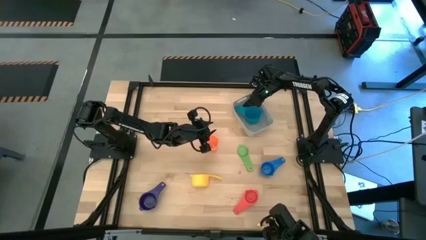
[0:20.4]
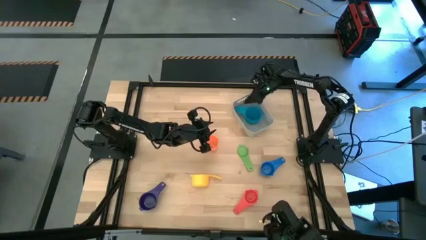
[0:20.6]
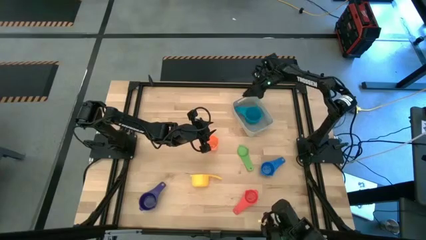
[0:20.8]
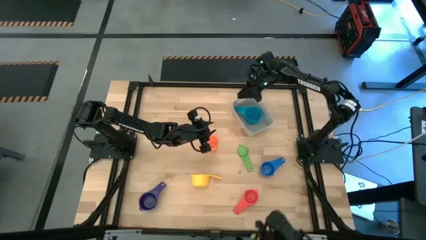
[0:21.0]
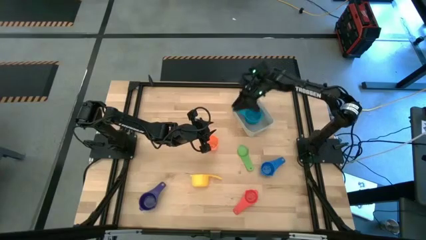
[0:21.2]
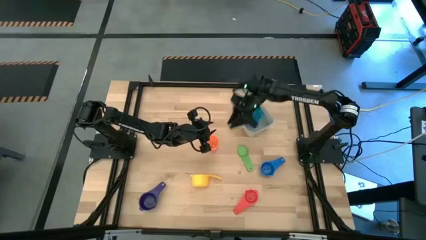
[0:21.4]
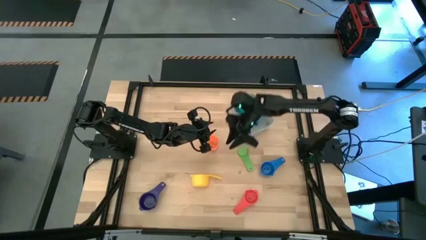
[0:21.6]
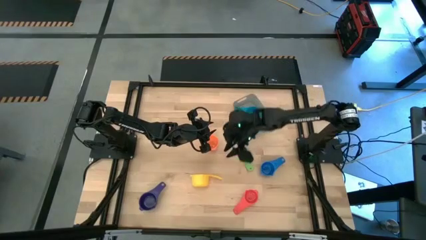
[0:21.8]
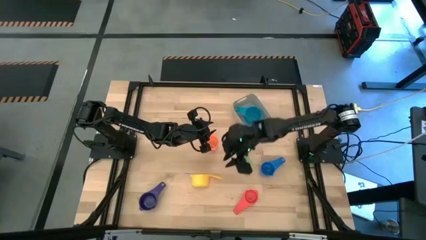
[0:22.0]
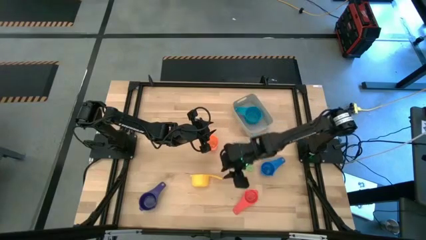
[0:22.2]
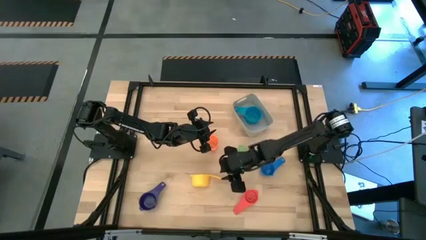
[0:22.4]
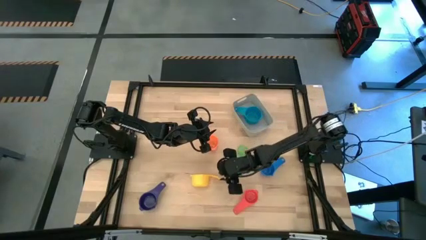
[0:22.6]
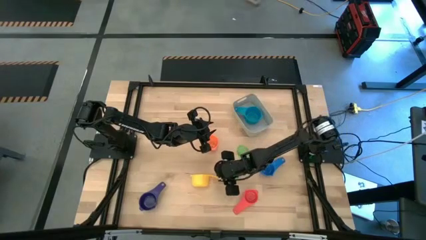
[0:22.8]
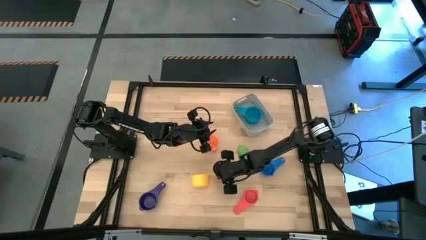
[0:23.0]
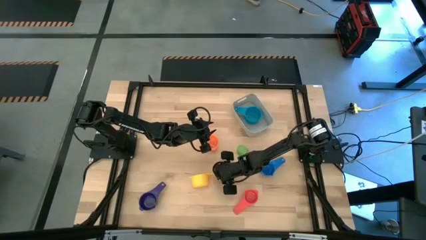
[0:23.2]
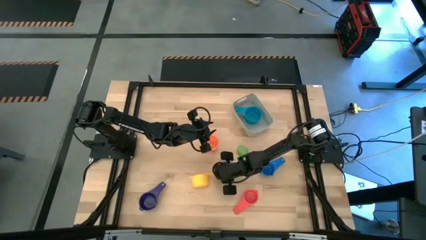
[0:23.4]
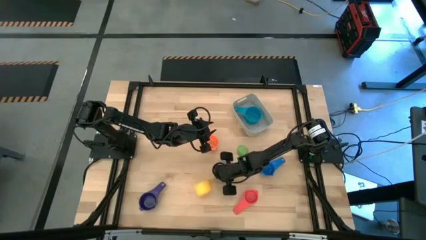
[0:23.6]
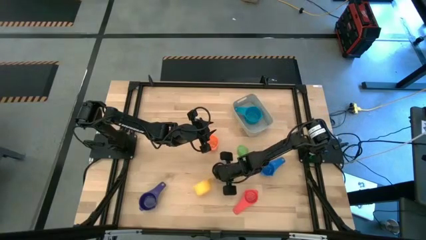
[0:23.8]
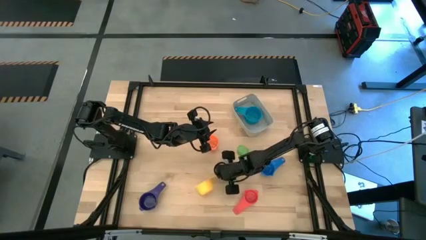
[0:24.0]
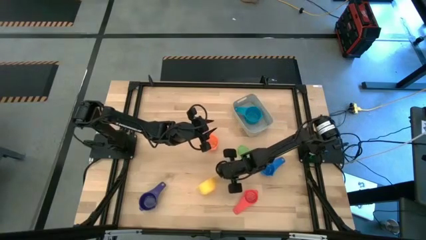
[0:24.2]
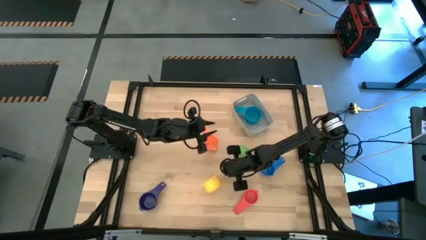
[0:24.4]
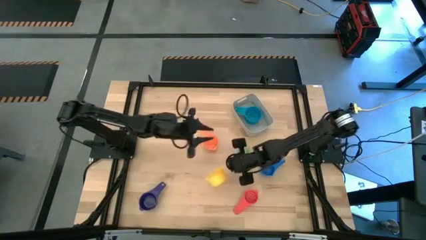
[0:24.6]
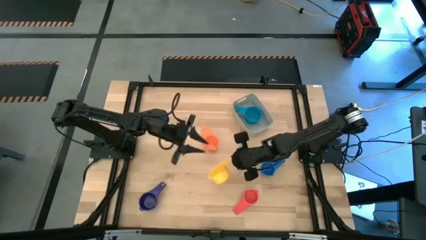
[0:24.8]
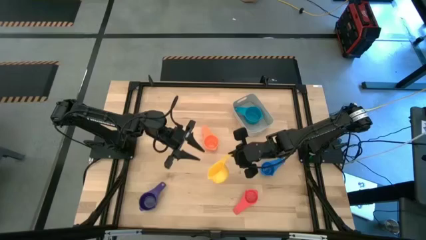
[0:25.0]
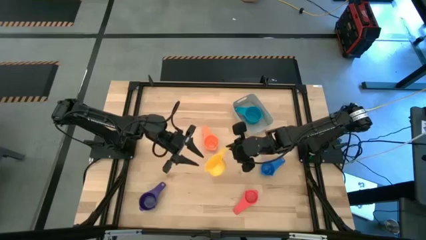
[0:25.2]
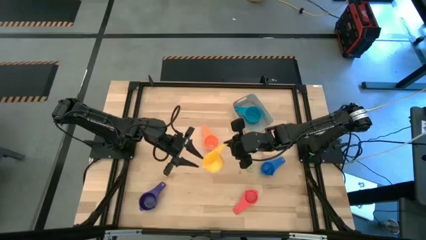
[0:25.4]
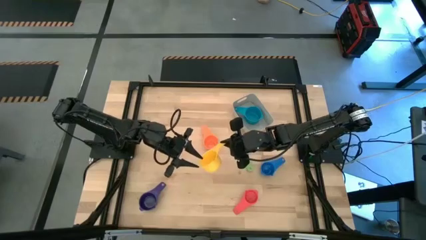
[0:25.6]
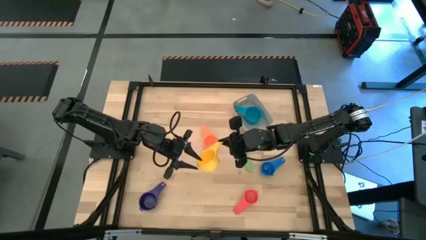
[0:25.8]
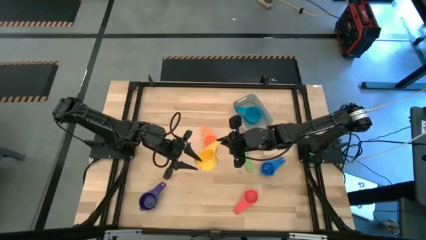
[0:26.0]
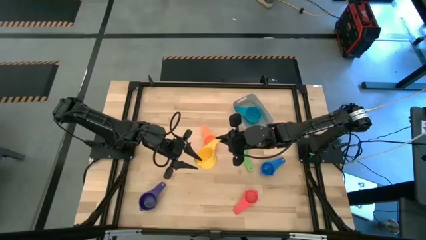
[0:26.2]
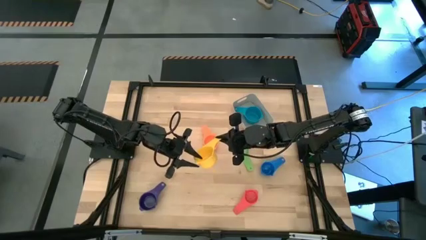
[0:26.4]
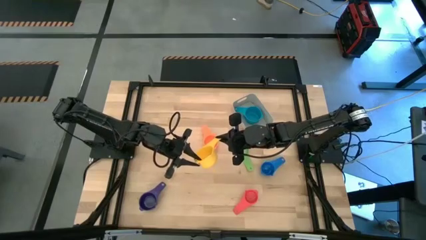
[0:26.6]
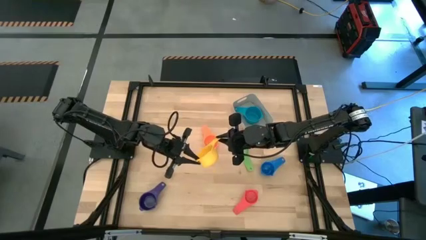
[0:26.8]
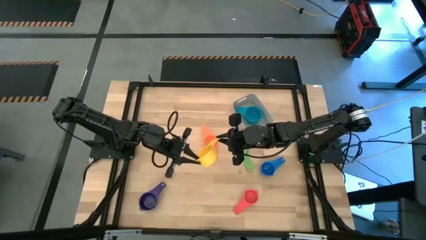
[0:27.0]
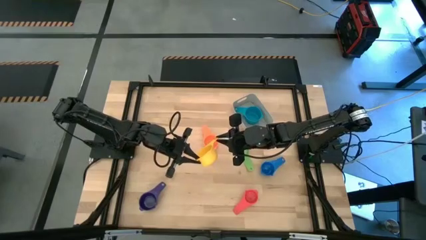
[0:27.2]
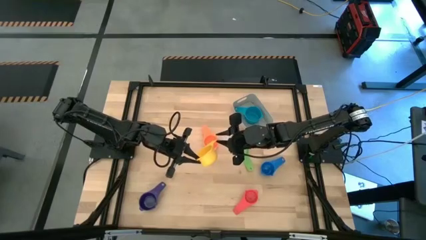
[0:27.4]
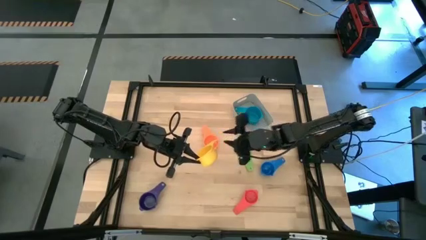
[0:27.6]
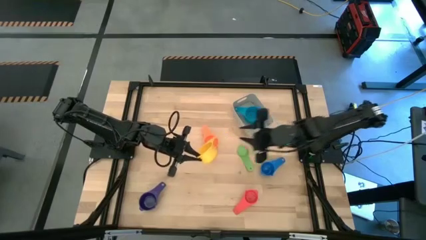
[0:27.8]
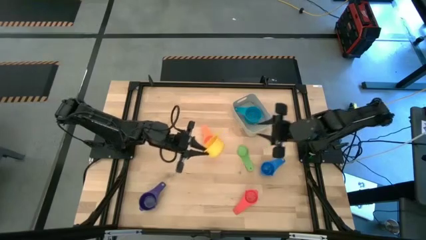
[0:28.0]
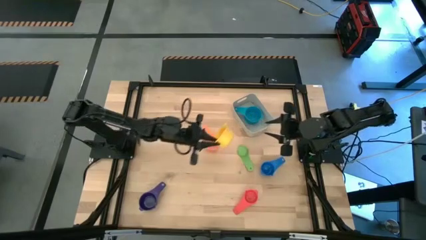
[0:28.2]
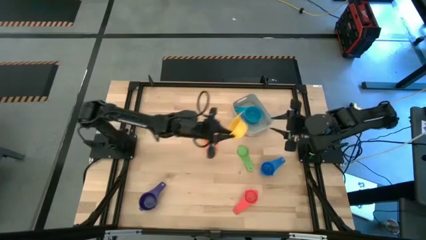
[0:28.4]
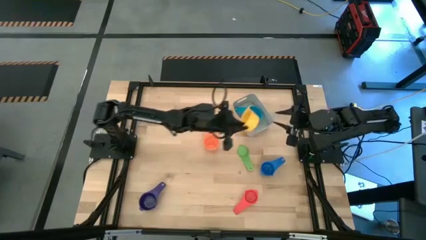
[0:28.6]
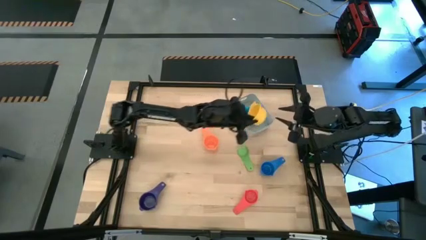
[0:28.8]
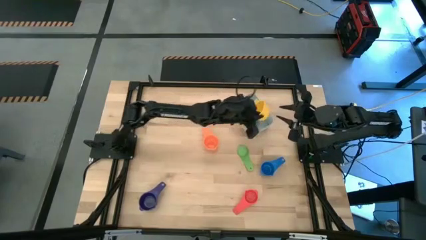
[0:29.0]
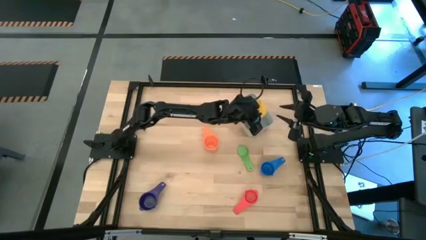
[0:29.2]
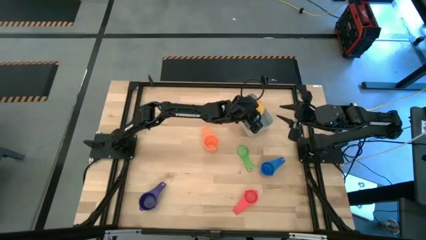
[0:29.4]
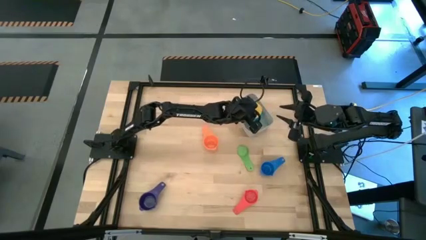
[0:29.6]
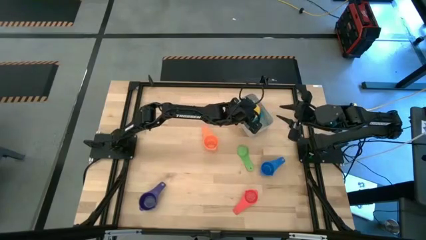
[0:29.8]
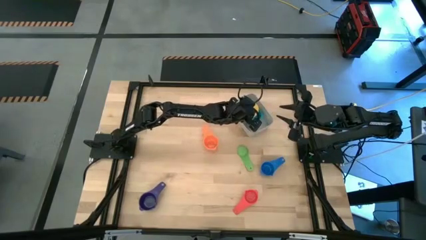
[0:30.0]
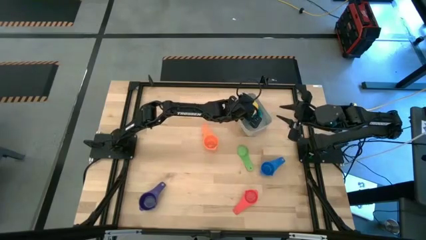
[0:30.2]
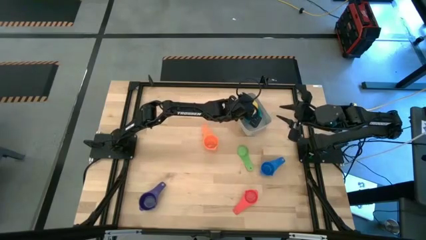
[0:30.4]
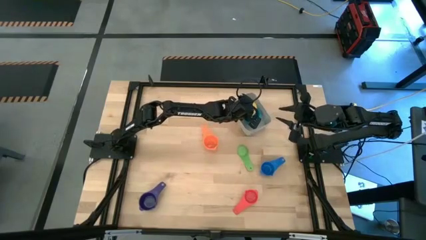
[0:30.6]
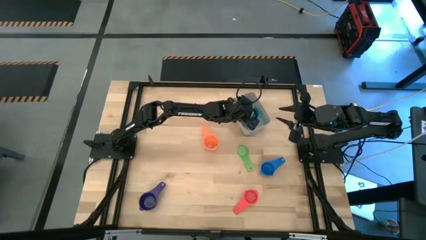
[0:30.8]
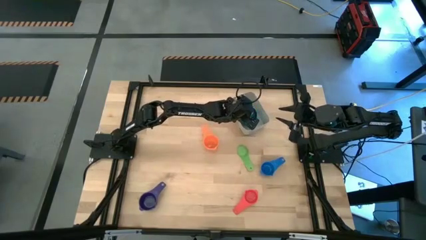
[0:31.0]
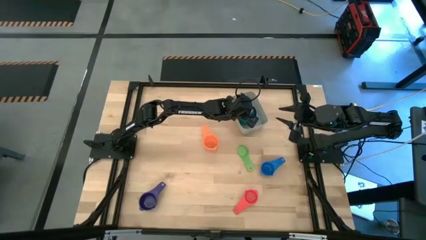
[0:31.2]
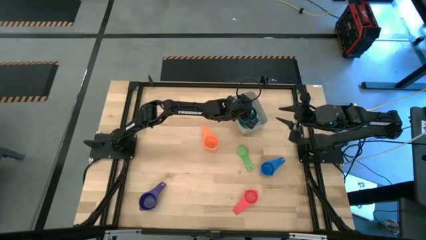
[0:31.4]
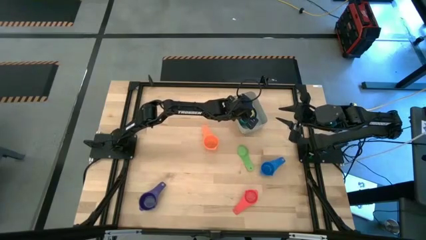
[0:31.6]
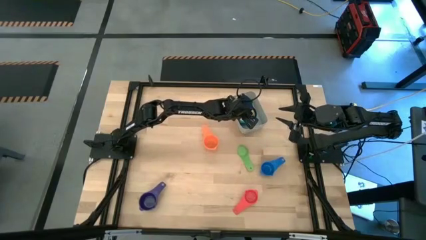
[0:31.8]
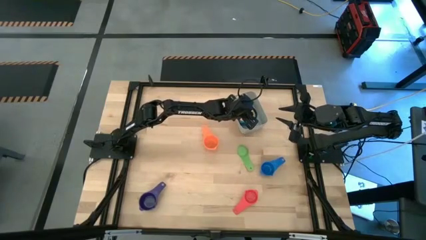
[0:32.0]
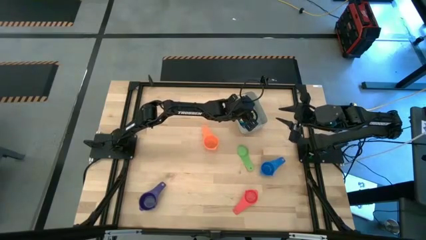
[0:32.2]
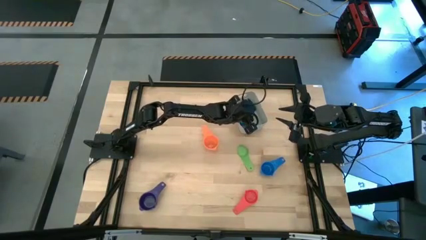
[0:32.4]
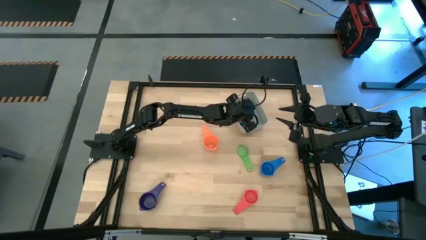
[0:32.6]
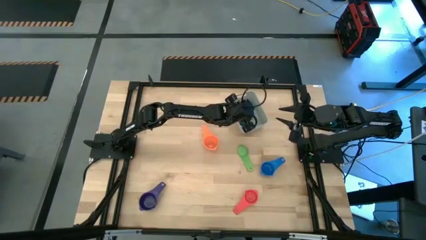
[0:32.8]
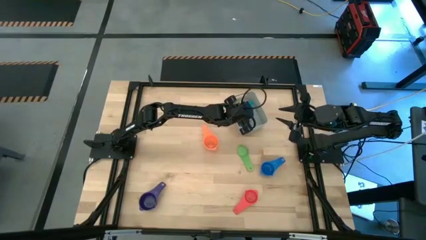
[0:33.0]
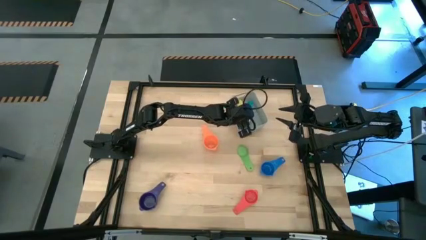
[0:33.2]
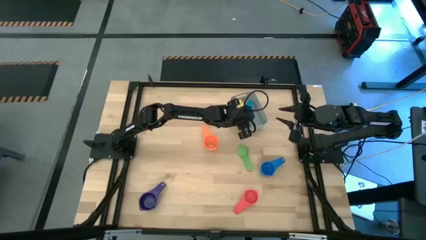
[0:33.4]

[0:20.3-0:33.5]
Task: Nest measuring cups in basket
Stack the yellow measuring cup on top of the light blue measuring cup into the gray bin
